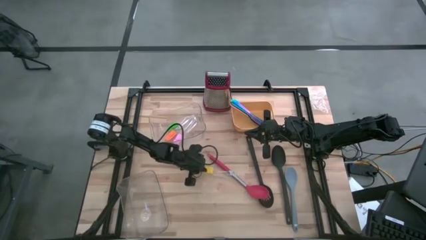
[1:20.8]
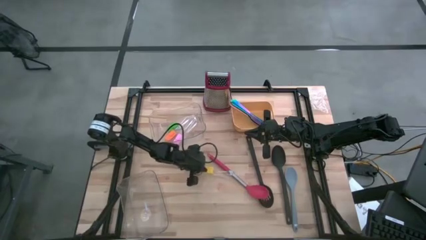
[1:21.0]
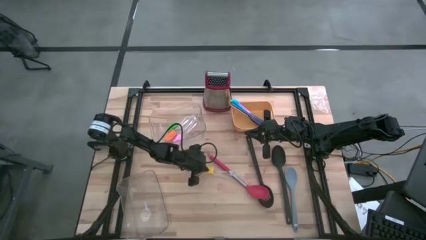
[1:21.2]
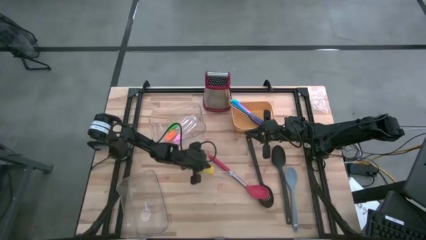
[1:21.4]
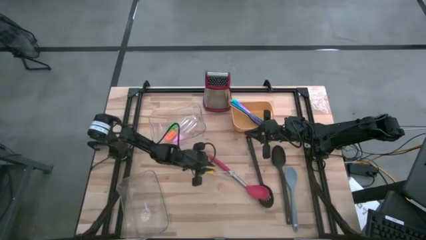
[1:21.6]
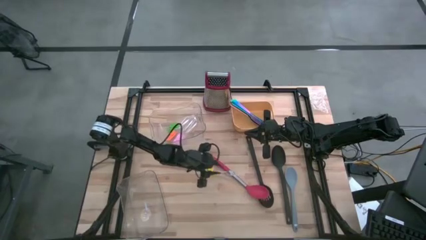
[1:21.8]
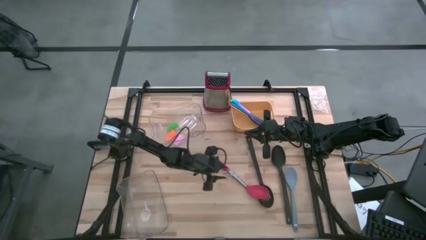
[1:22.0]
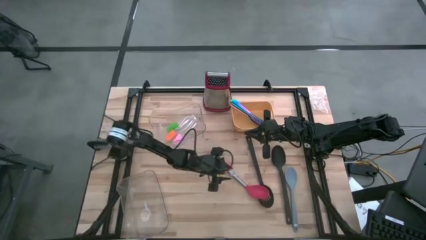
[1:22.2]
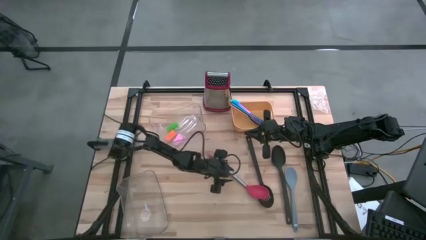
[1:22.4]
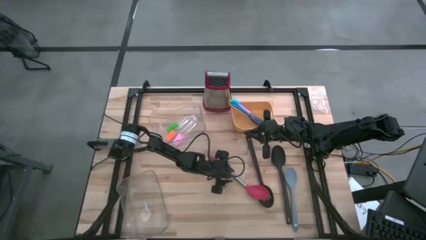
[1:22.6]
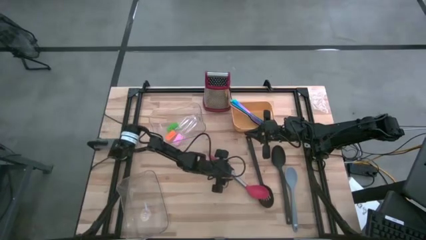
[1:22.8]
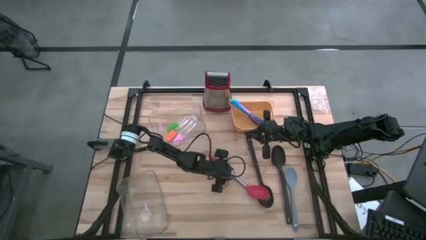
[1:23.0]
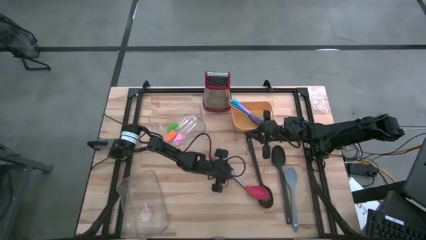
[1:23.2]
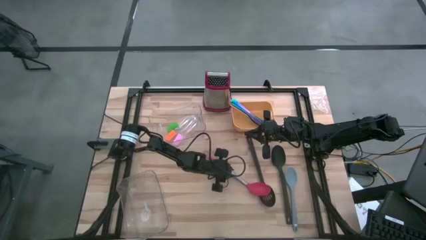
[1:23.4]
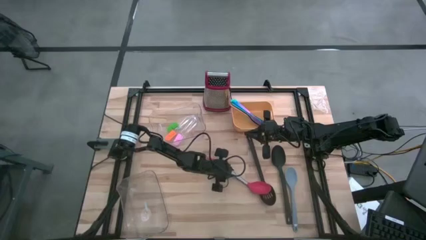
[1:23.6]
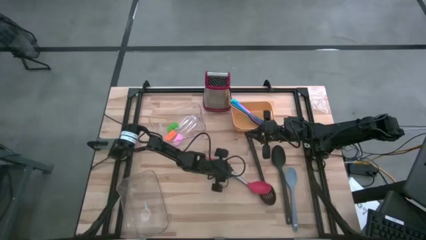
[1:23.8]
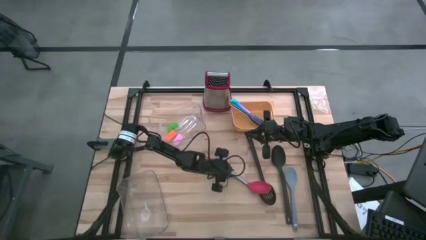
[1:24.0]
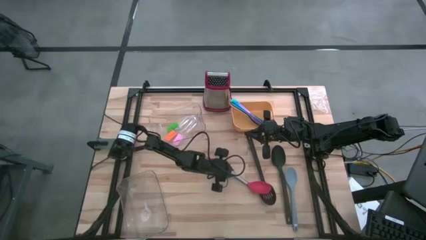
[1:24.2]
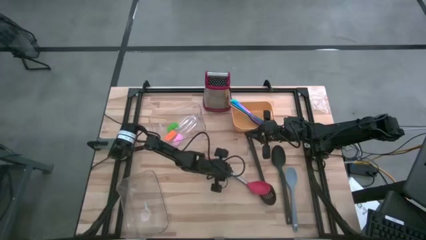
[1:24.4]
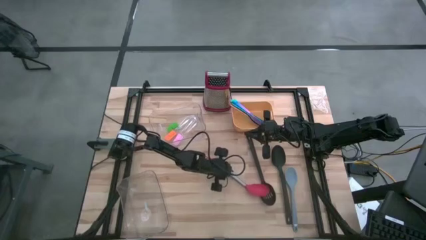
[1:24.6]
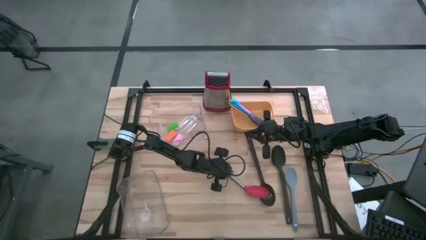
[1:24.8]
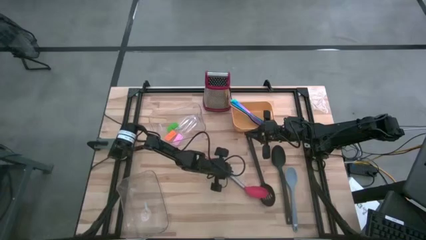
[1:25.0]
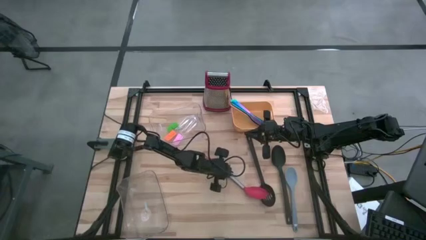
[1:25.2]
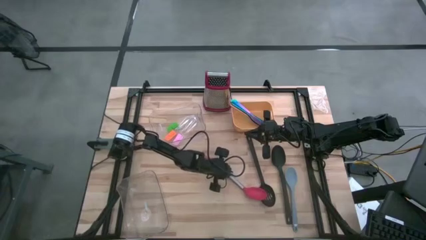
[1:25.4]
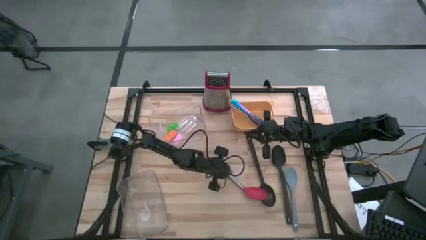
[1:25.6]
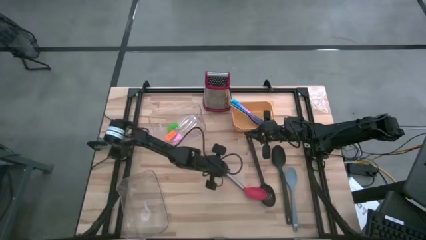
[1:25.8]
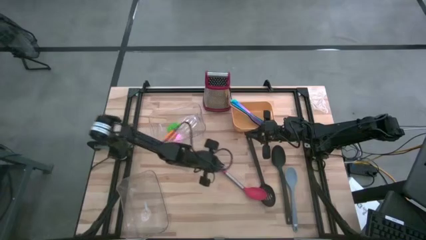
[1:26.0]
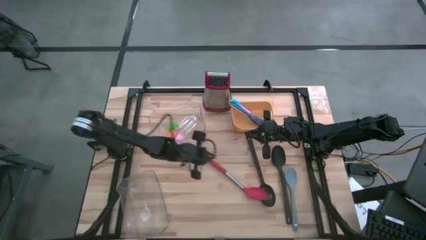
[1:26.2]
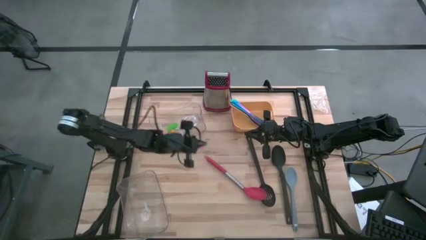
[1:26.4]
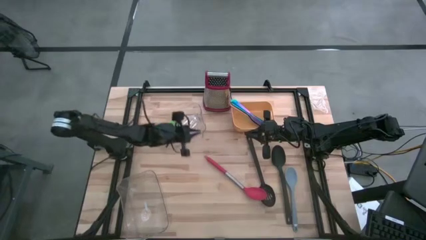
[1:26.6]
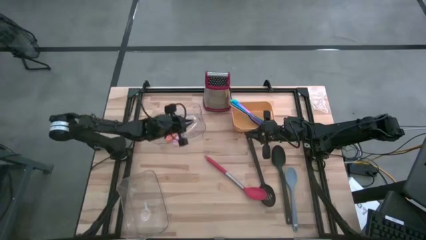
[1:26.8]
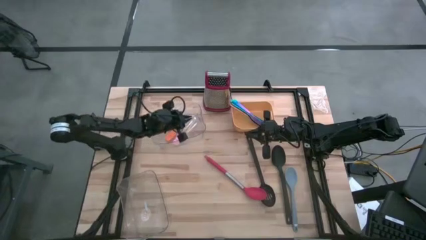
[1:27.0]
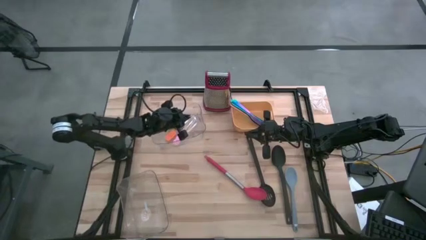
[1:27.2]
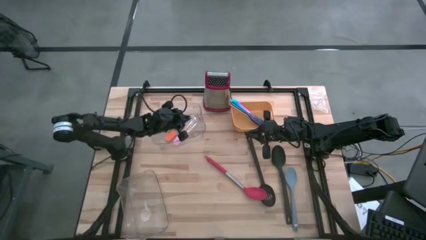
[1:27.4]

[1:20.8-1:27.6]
Task: Pick & Place Kitchen Items
Put the yellow spatula into the top transparent bin
